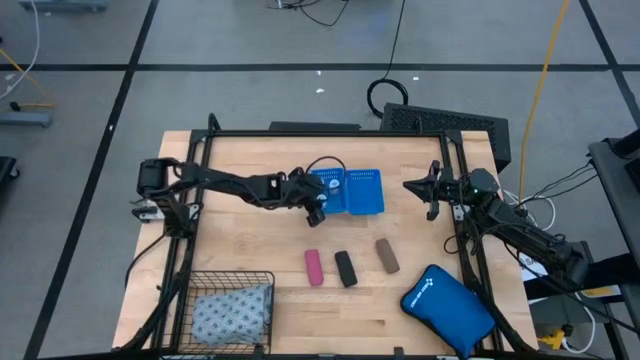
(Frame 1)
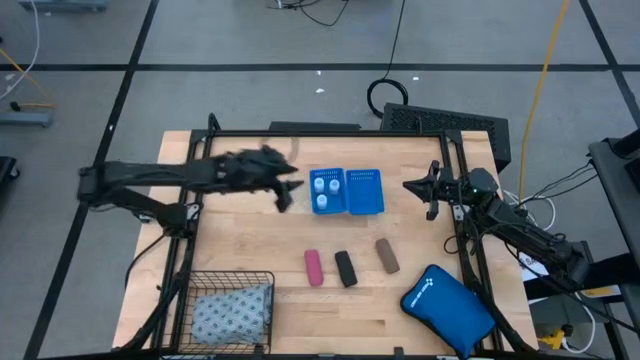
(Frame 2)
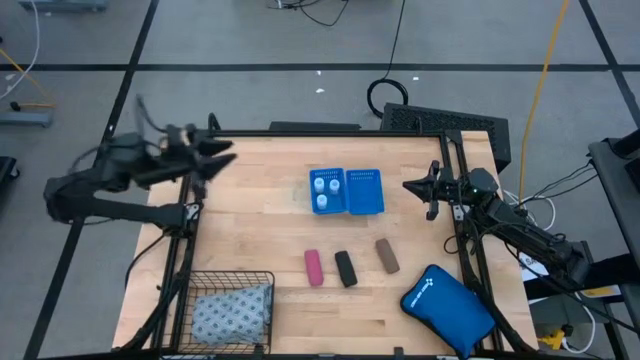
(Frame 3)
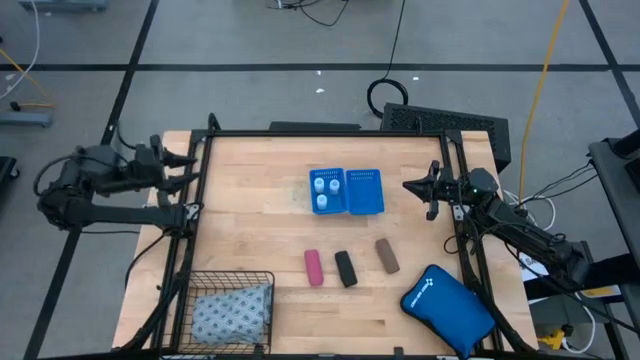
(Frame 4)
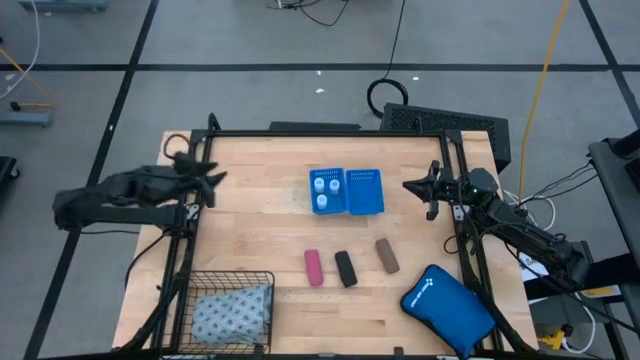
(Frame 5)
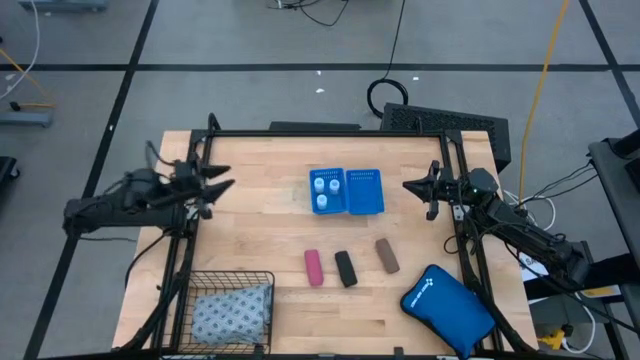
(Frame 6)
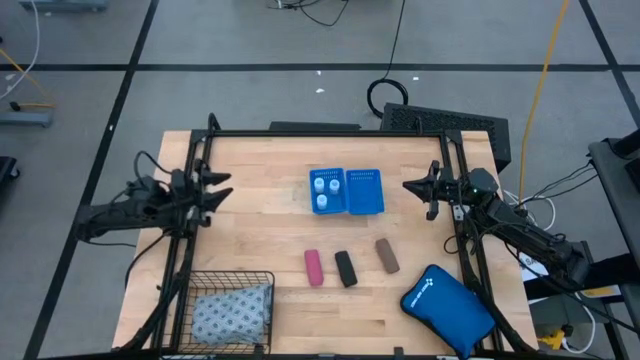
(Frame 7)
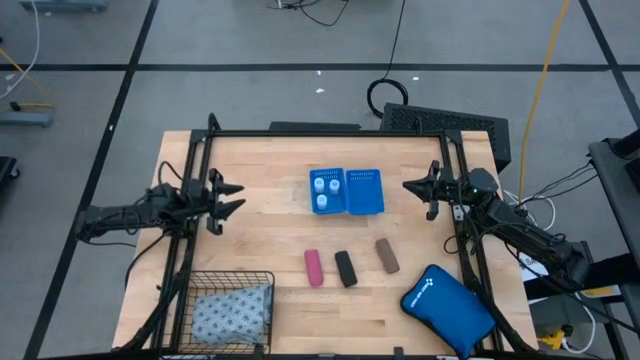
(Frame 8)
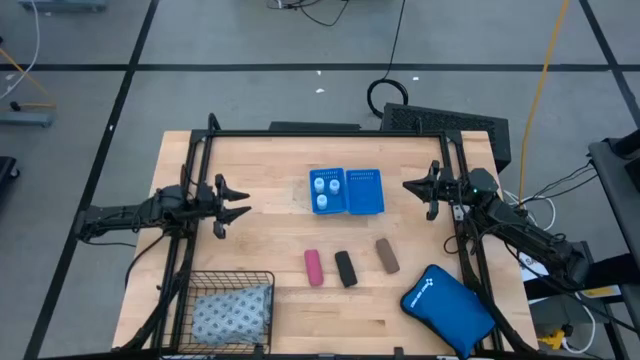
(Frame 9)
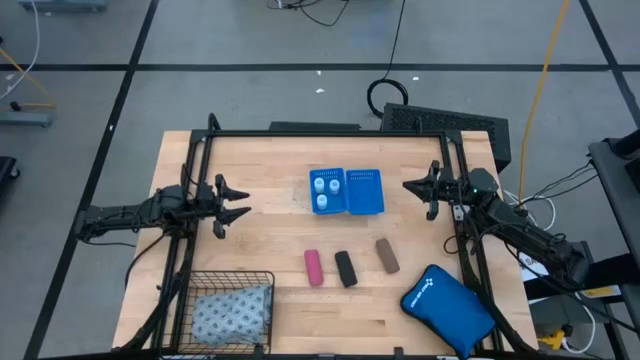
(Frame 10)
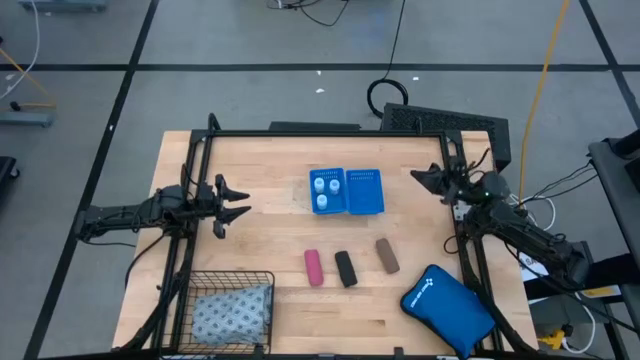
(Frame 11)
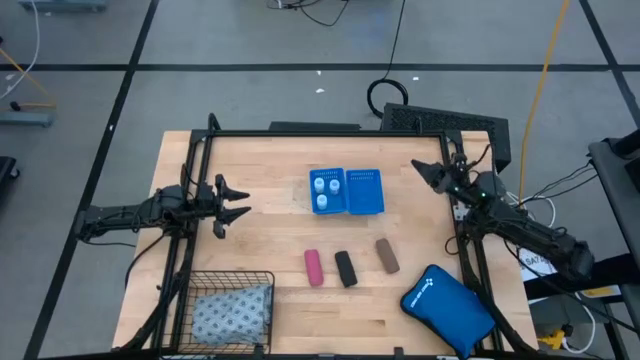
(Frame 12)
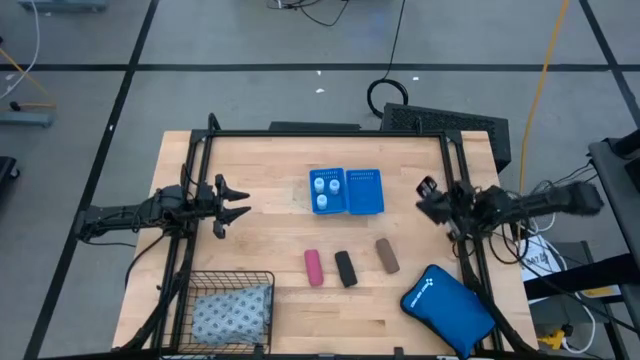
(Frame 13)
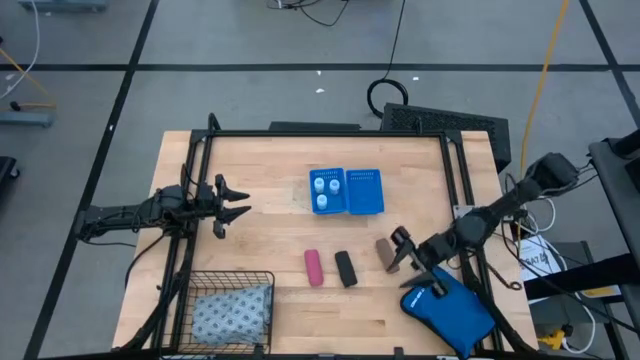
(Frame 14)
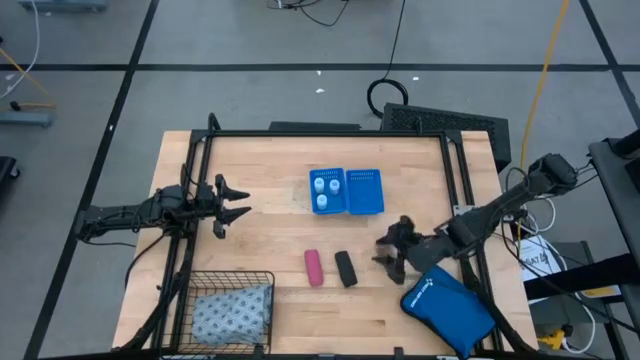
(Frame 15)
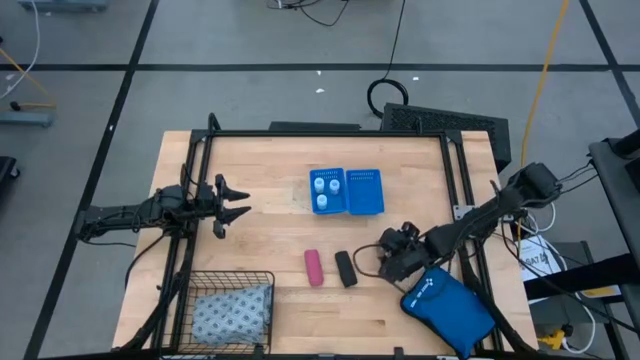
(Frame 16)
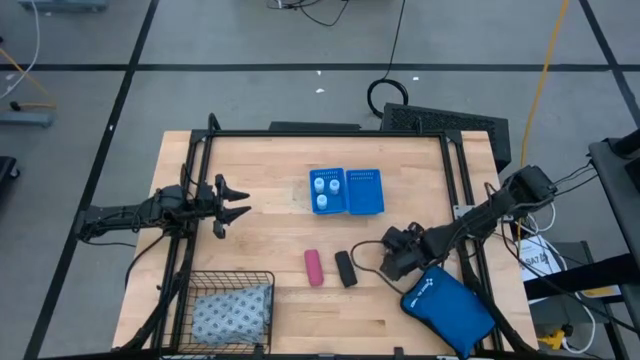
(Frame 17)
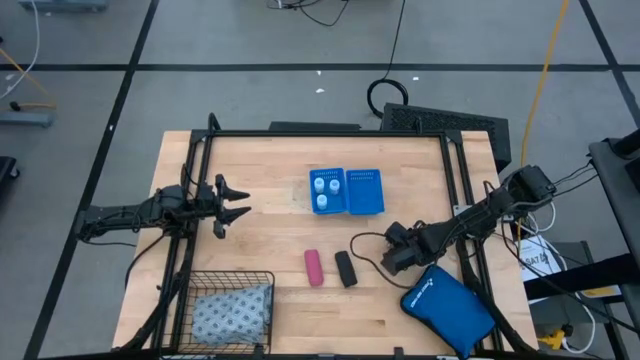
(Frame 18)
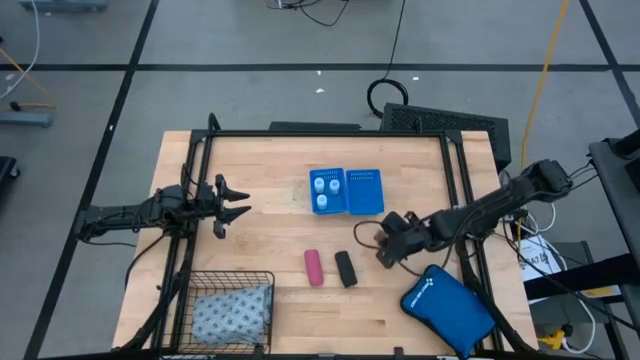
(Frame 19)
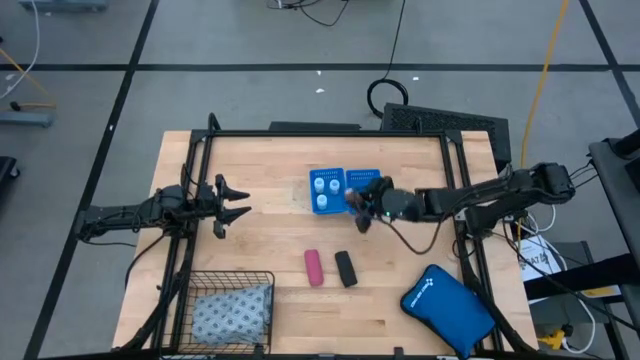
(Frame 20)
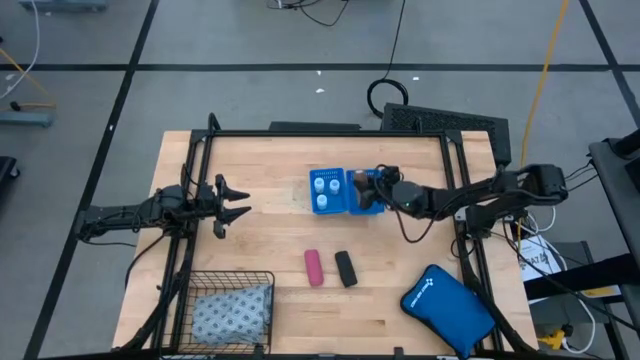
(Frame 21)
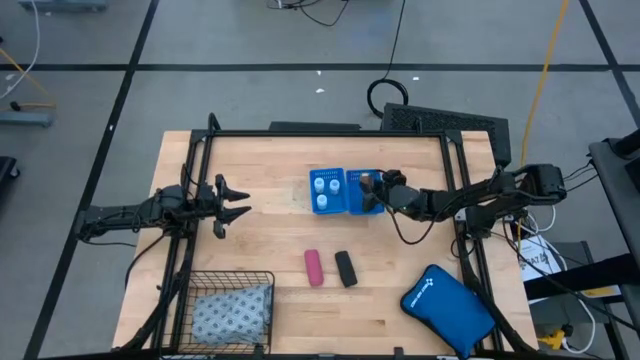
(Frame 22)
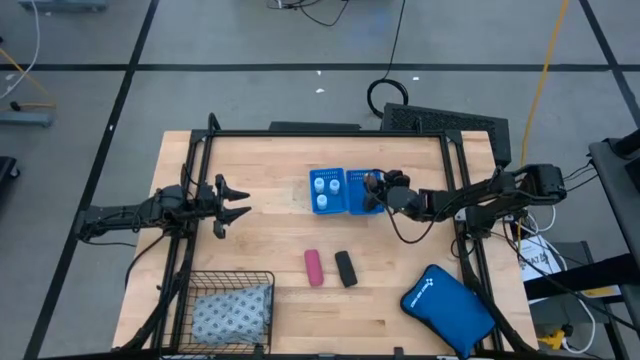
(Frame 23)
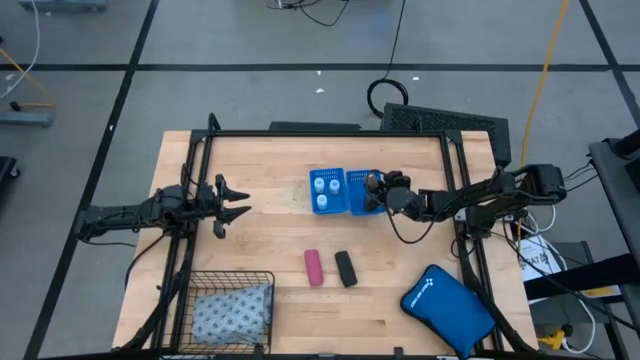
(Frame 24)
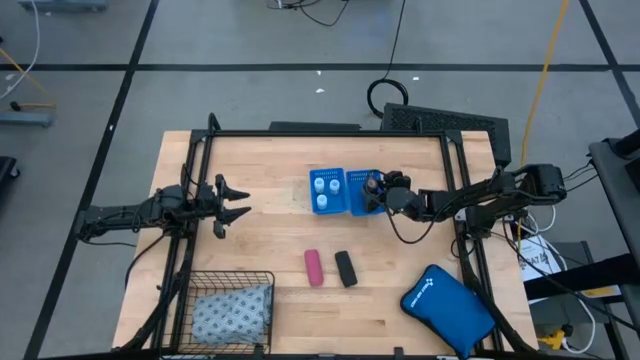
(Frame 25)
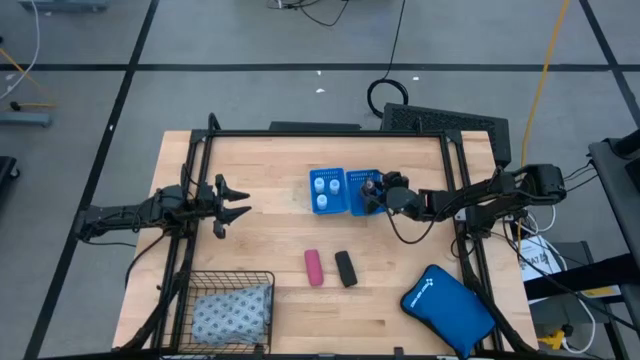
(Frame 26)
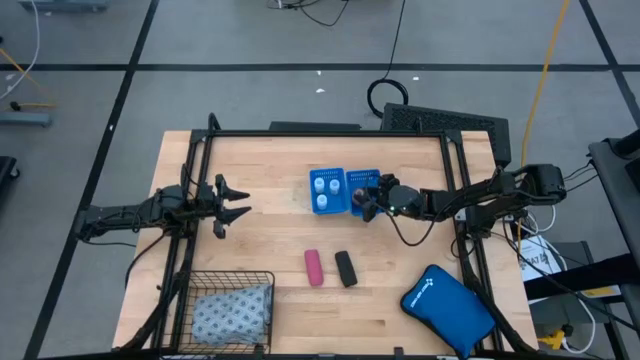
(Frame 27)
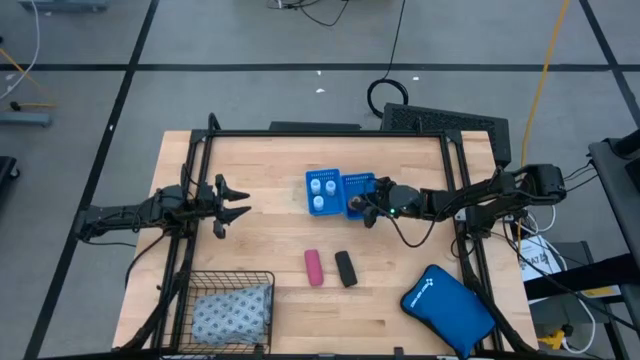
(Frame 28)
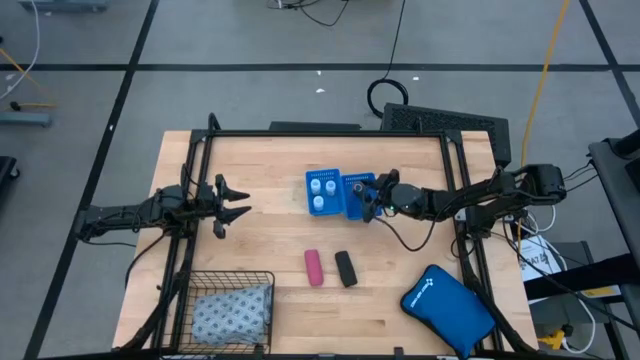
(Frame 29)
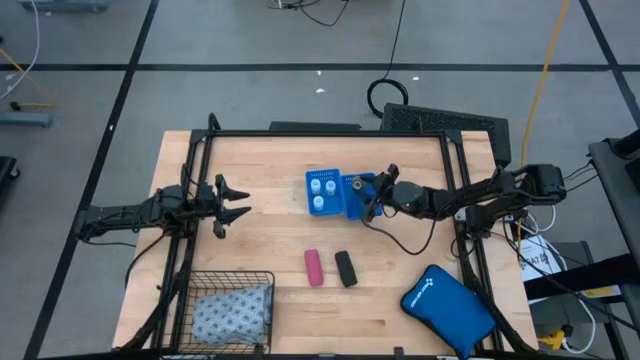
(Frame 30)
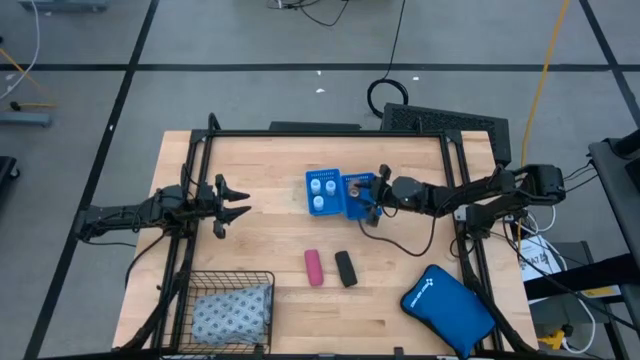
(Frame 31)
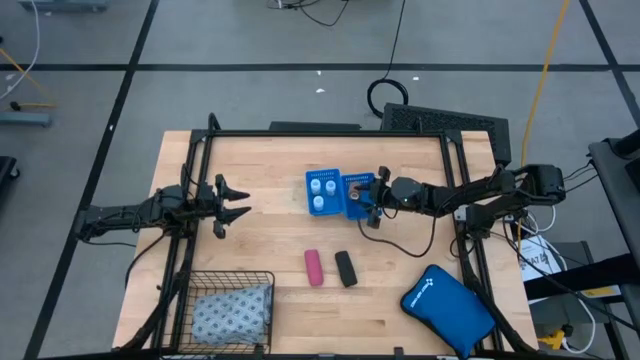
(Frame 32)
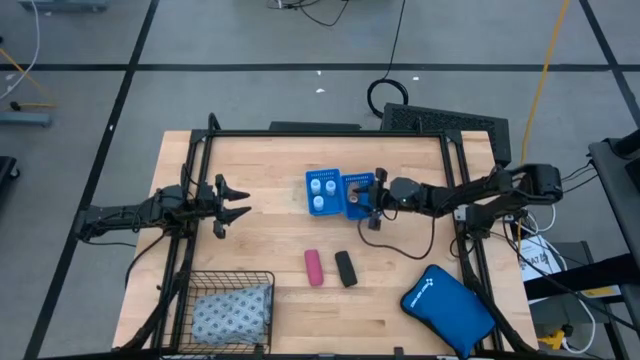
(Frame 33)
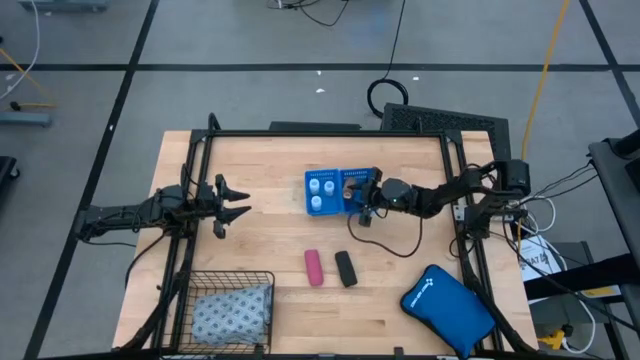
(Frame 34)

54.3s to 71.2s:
Task: Pick & place medical supplies in basket/bin
Put the brown bandage into the right blue bin

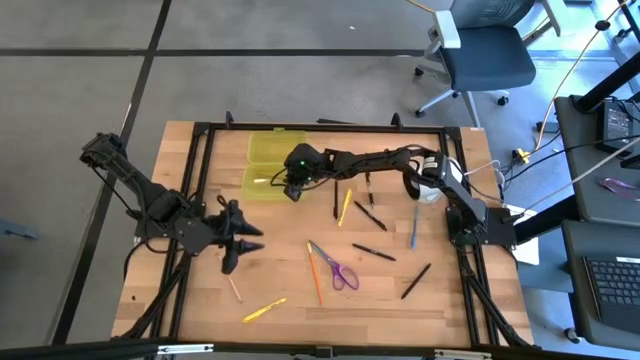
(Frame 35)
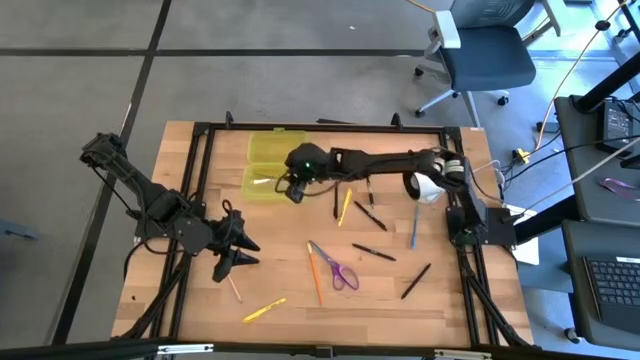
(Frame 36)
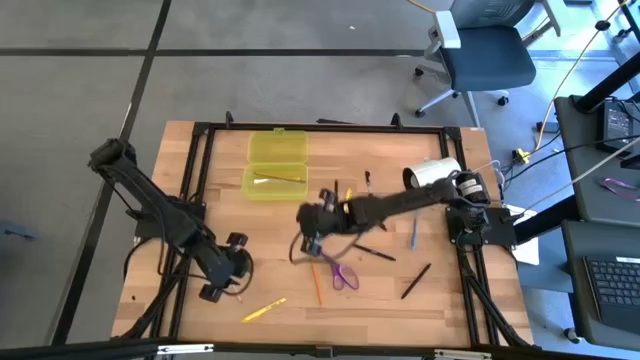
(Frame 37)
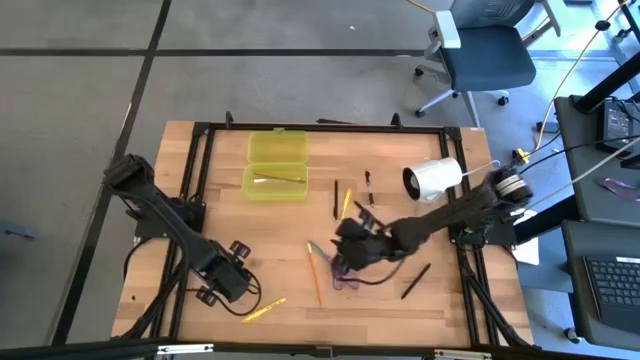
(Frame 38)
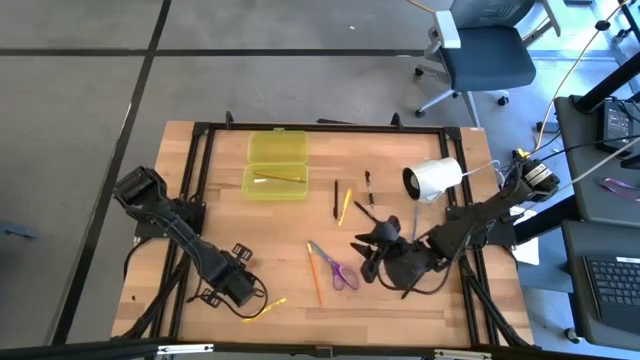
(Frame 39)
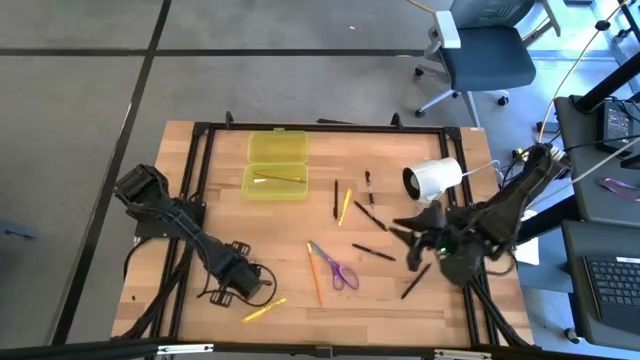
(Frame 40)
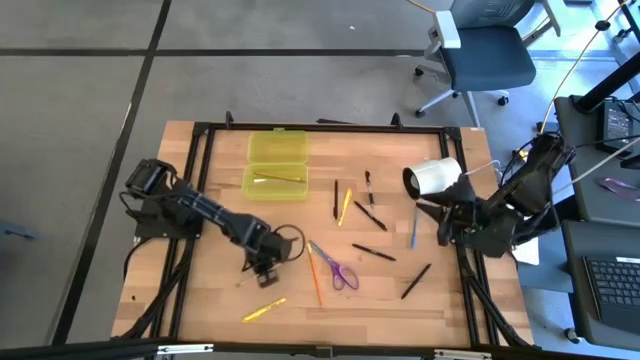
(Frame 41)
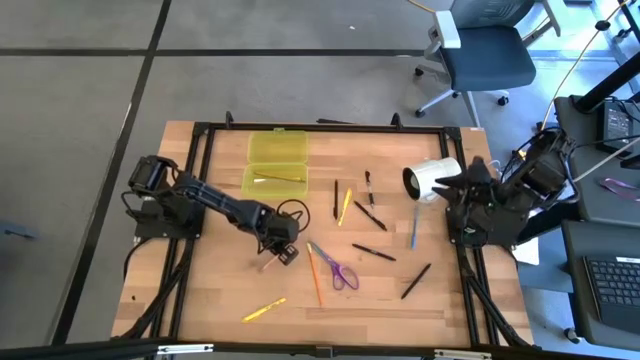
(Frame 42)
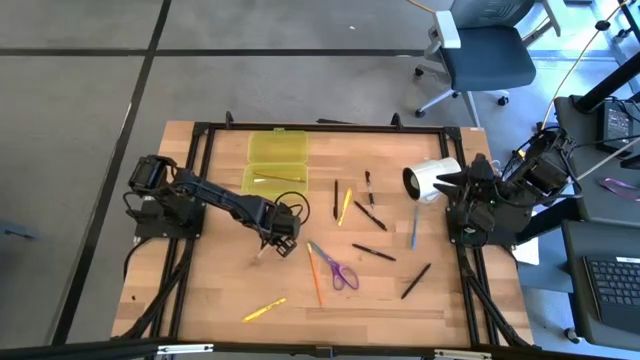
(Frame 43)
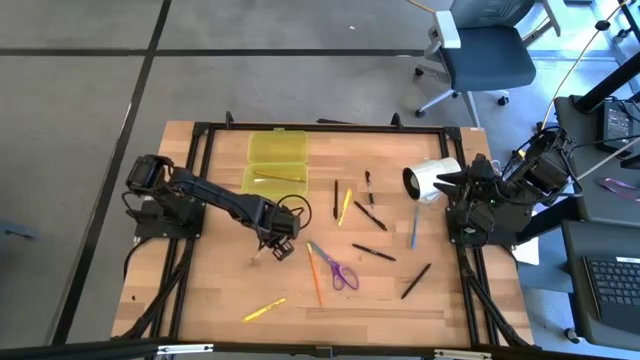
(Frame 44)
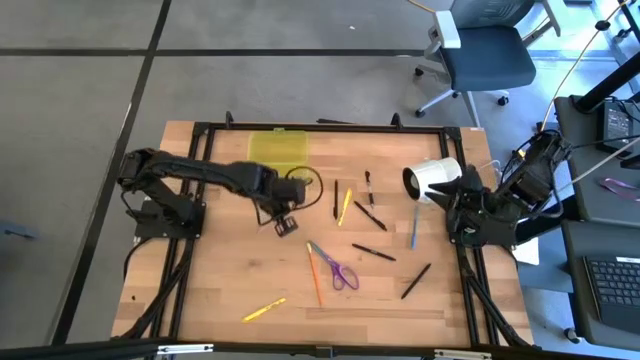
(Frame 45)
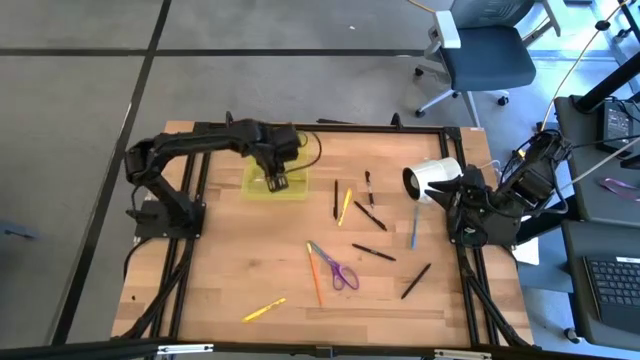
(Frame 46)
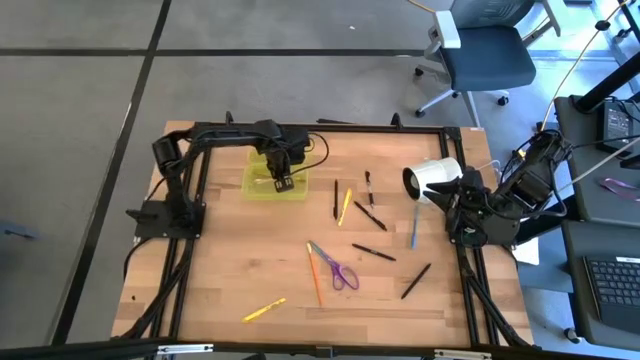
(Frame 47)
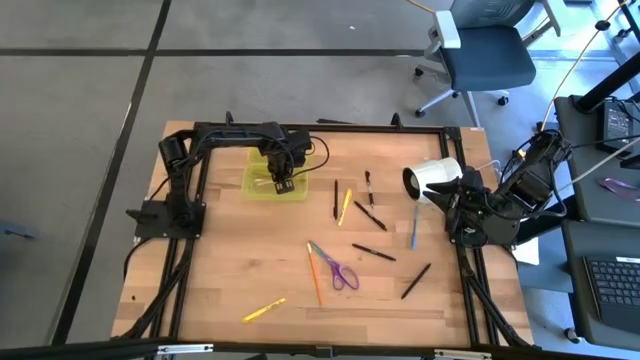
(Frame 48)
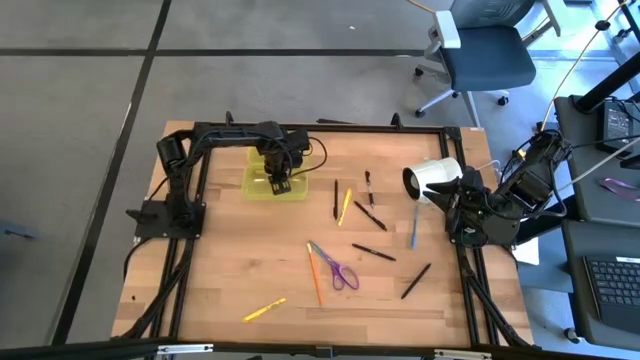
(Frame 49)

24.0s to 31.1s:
Task: Pick & place school supplies into a supply box
Put the light pink pencil into the yellow supply box
